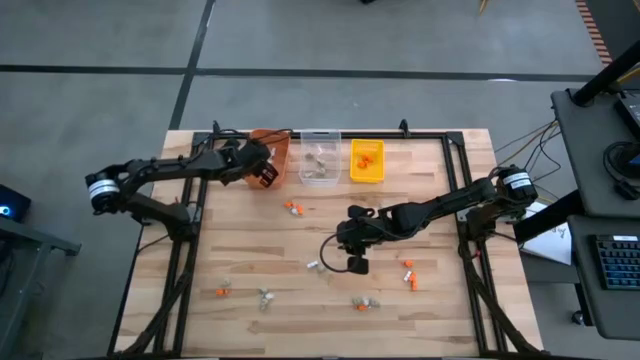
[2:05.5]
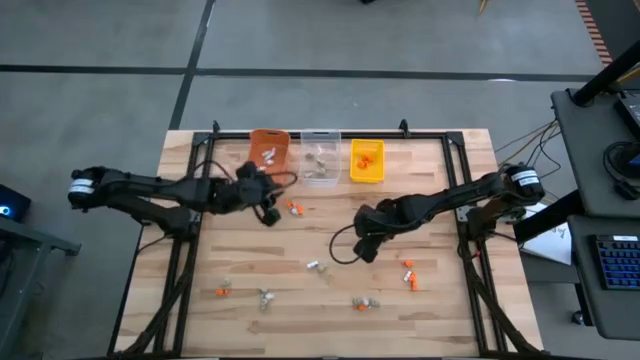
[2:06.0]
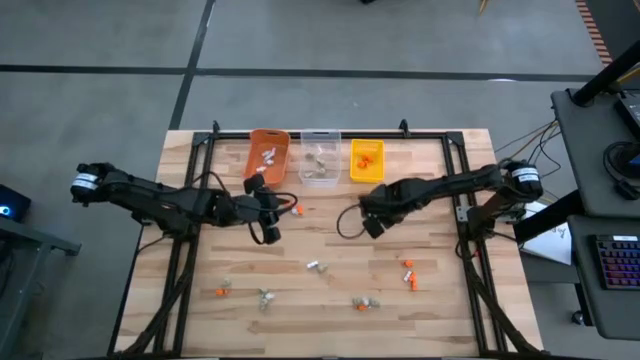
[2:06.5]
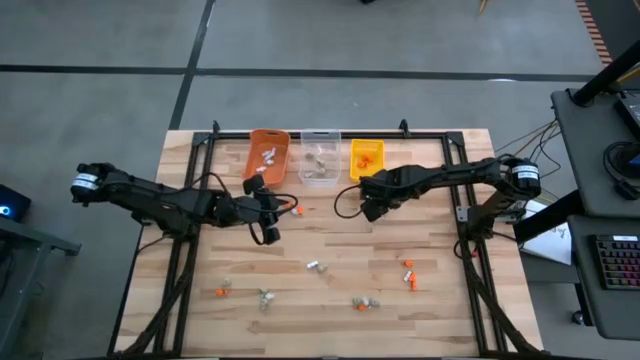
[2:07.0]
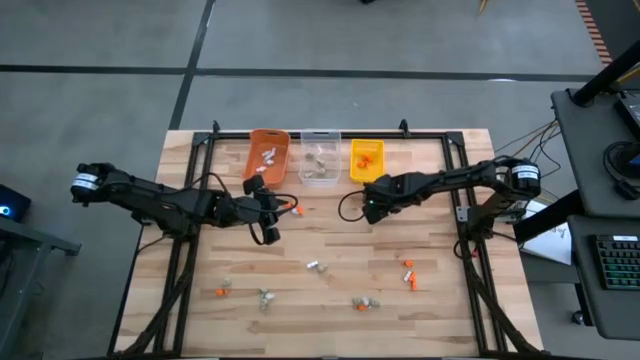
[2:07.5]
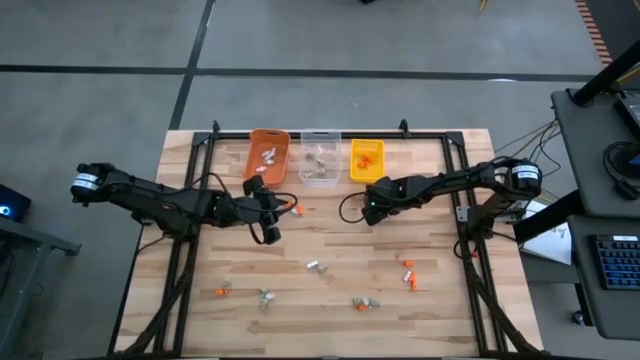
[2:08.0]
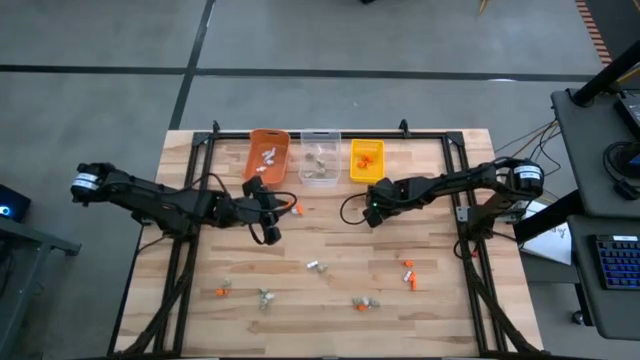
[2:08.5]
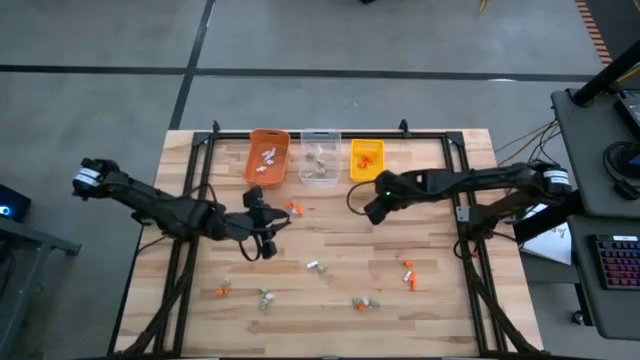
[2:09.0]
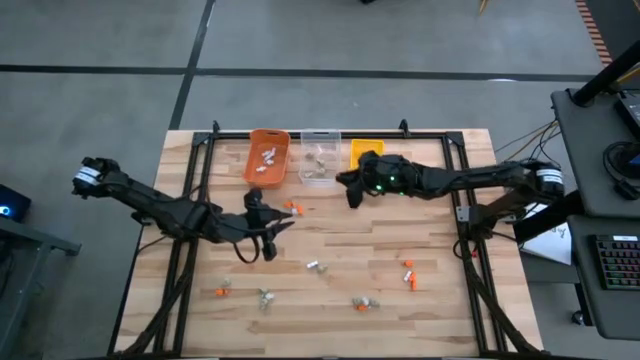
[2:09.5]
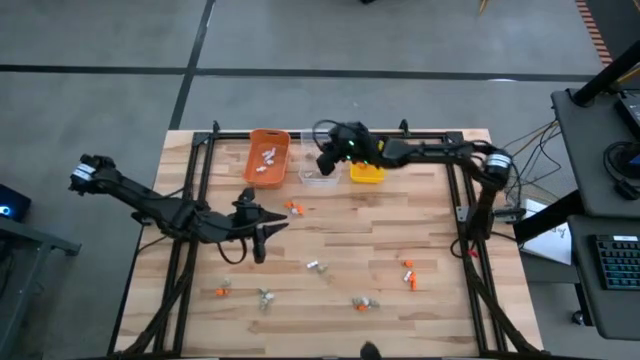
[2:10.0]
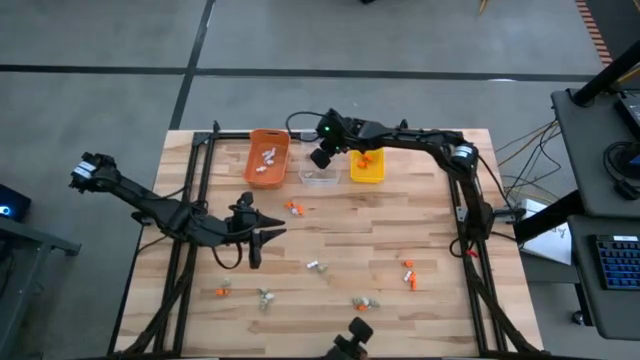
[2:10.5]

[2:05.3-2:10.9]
Task: Sort Halloween decoration
Put the gray skull toy into the transparent bin

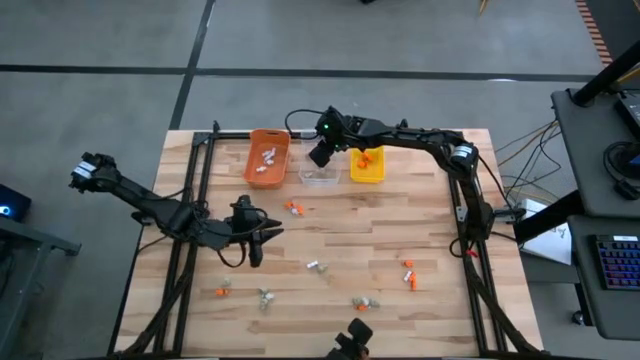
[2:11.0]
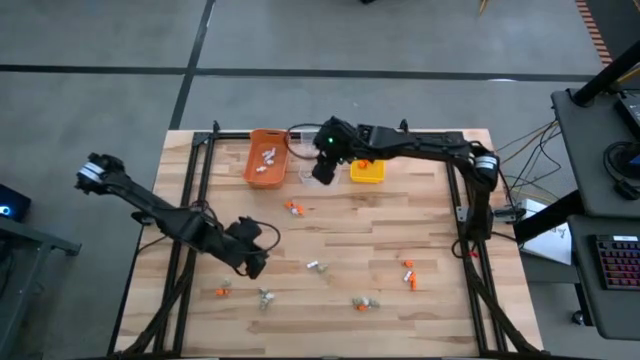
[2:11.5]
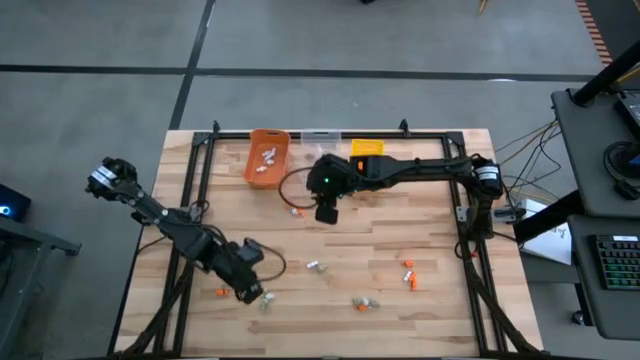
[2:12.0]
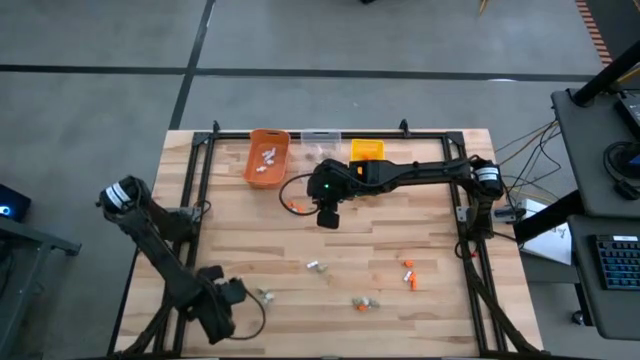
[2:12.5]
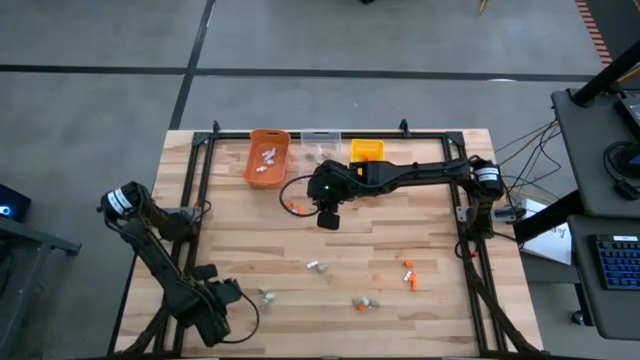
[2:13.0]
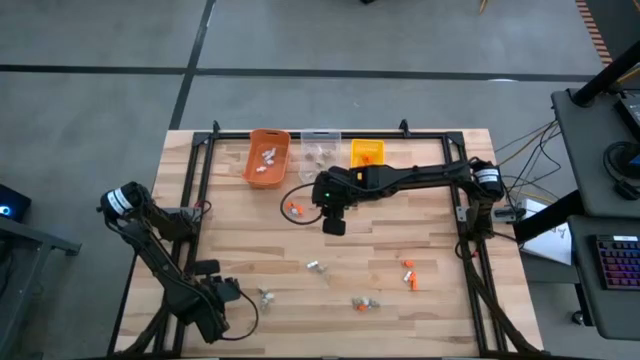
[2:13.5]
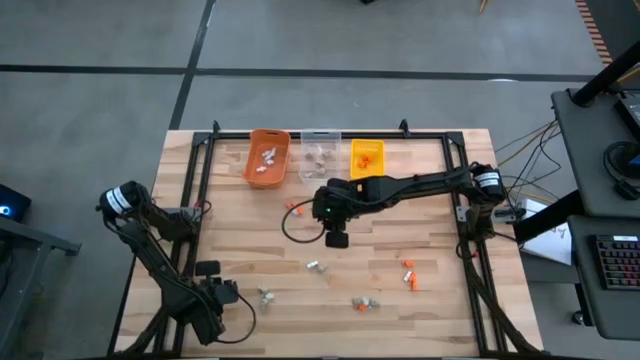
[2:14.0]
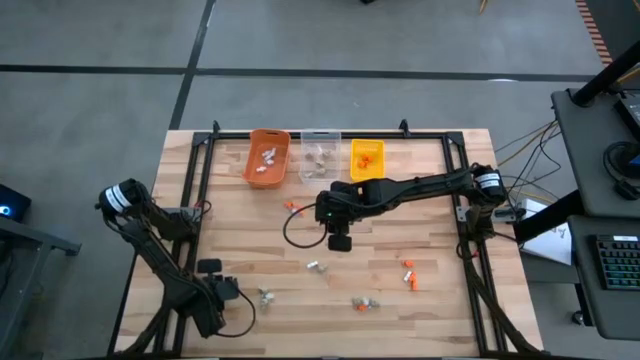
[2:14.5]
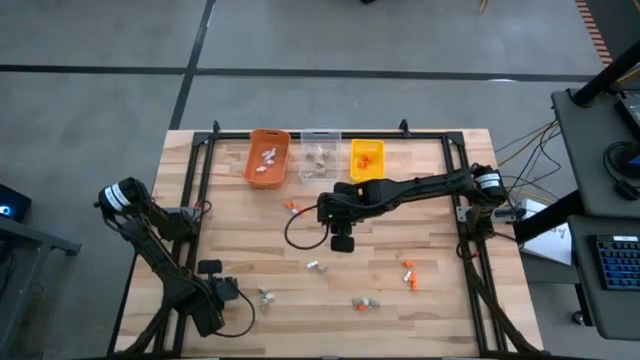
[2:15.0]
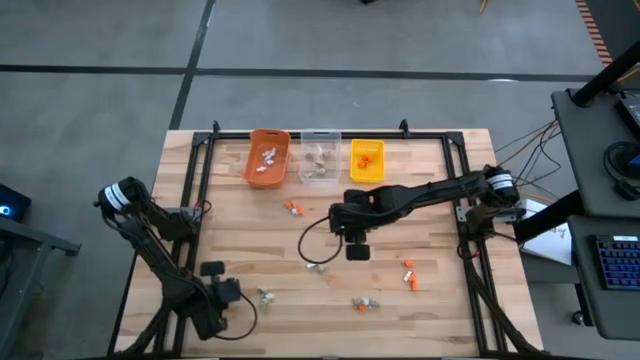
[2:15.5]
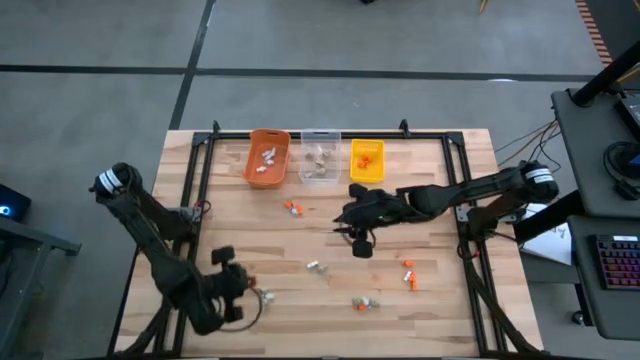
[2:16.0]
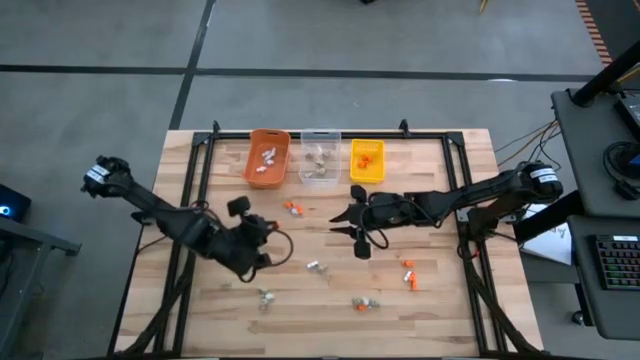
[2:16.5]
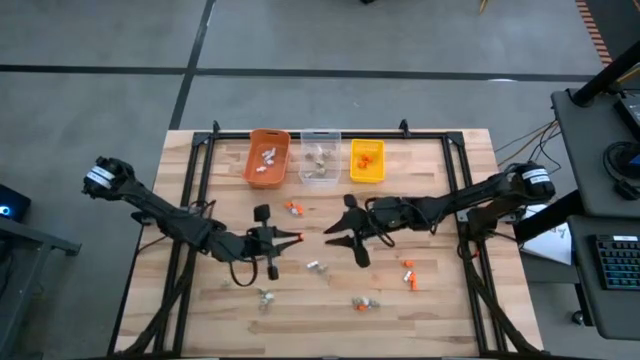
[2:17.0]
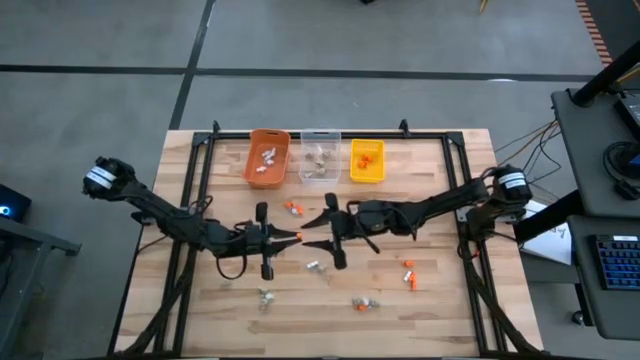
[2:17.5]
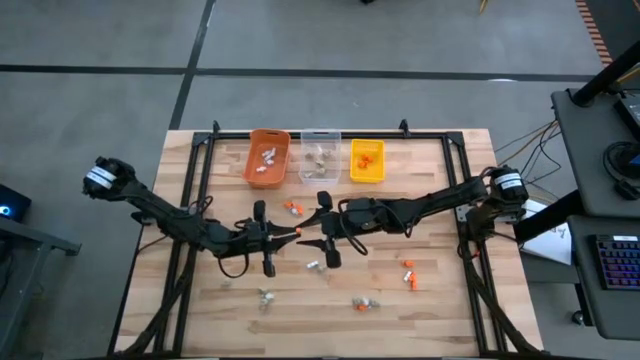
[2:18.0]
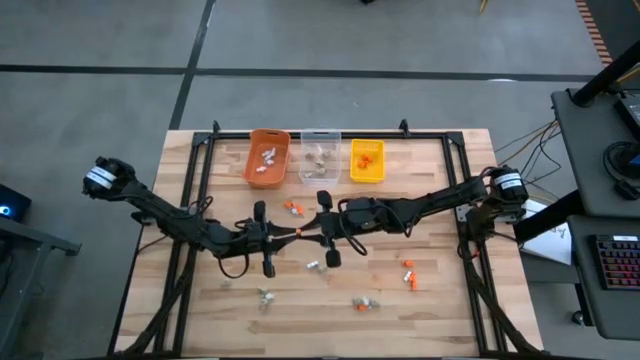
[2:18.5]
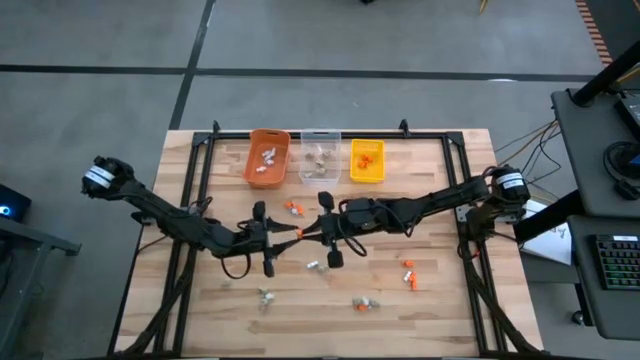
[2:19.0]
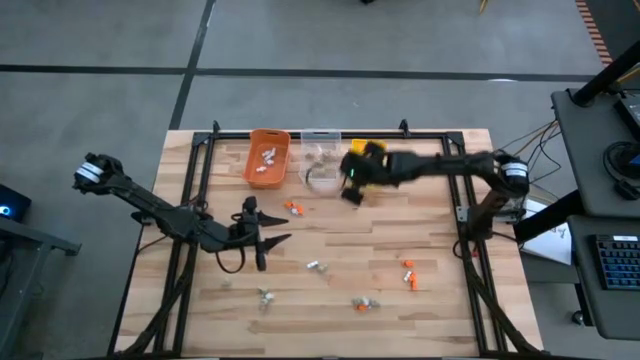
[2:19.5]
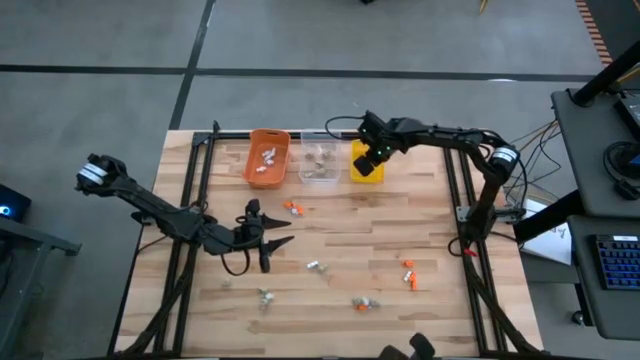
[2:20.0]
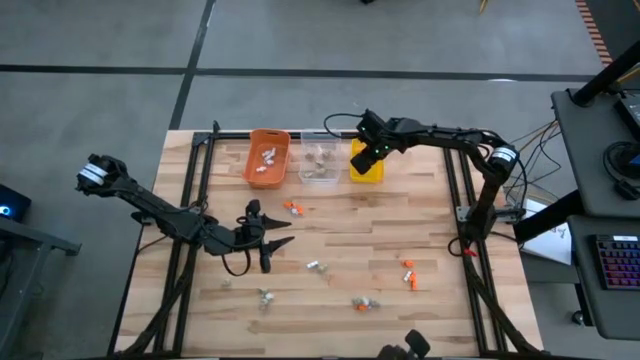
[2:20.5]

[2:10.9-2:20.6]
Put the orange skeleton toy into the yellow bin

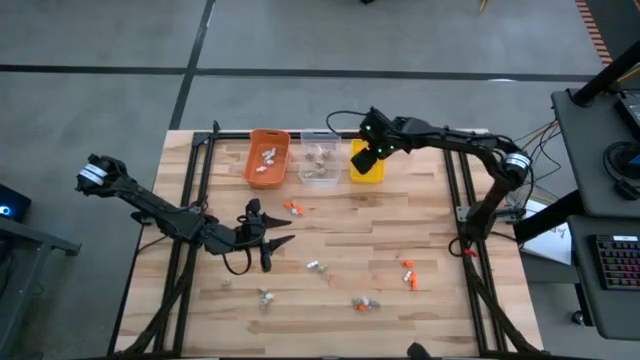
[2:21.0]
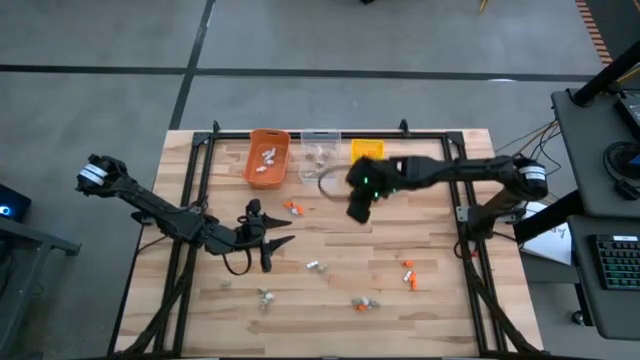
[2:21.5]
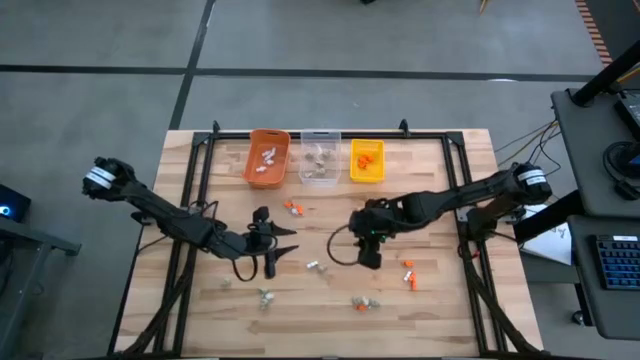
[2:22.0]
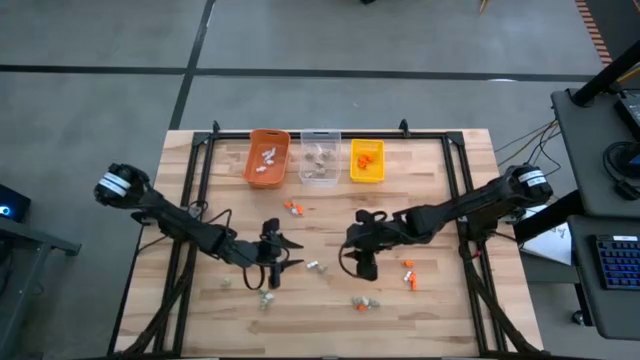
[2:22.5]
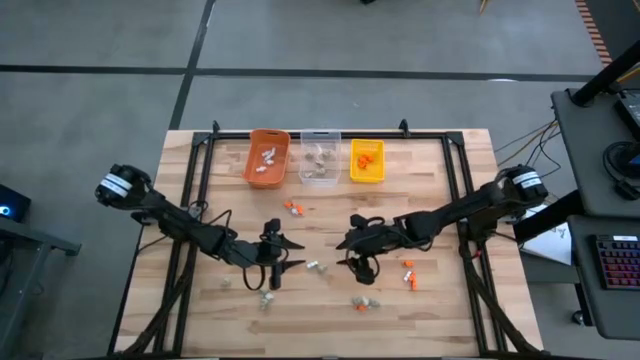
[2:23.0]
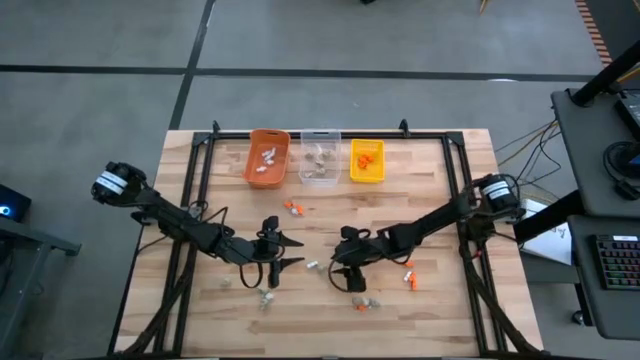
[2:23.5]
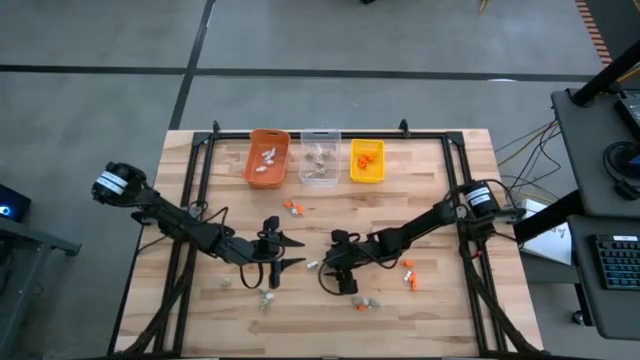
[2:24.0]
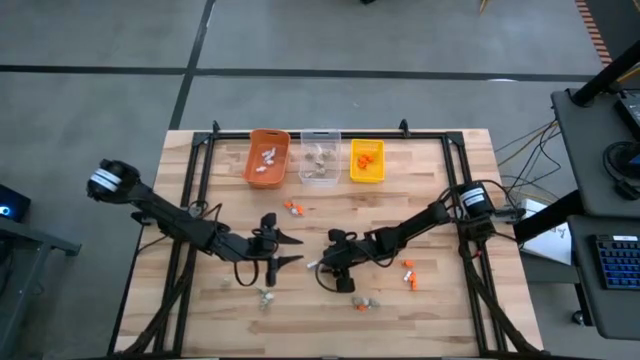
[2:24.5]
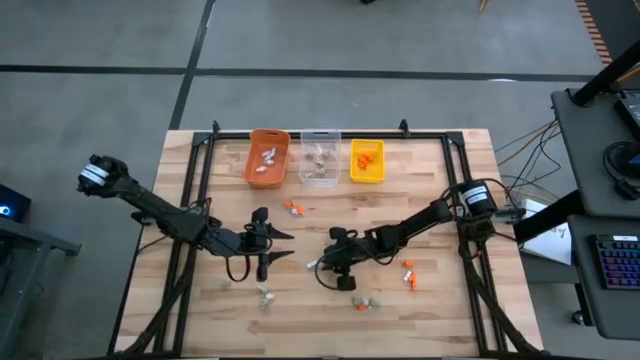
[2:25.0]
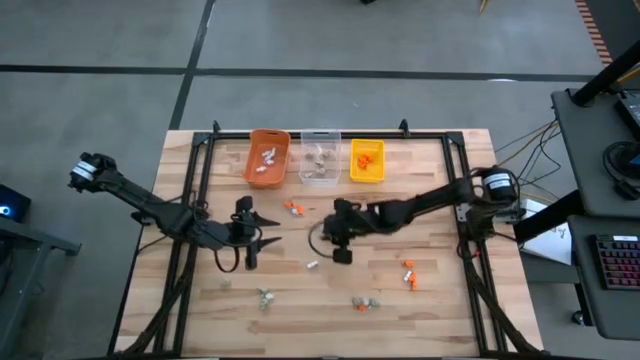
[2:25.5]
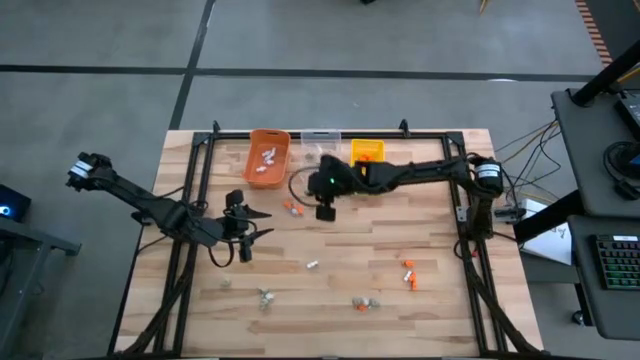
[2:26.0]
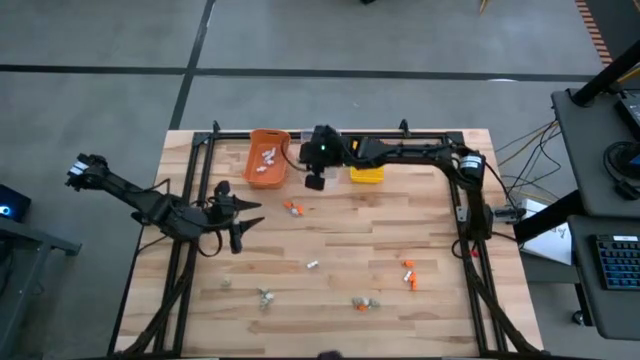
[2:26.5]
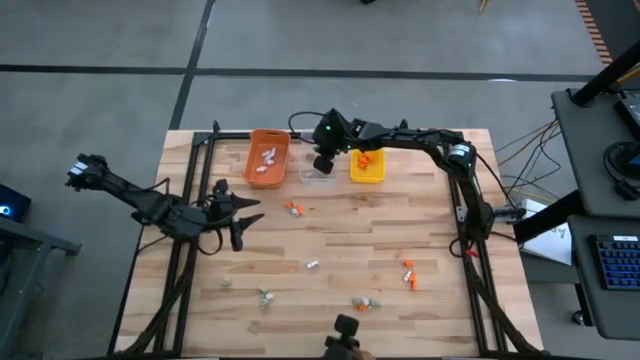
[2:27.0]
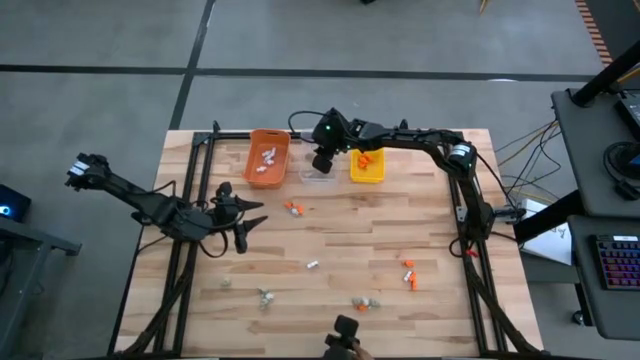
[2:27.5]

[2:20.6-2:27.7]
Put the gray skull toy into the transparent bin
